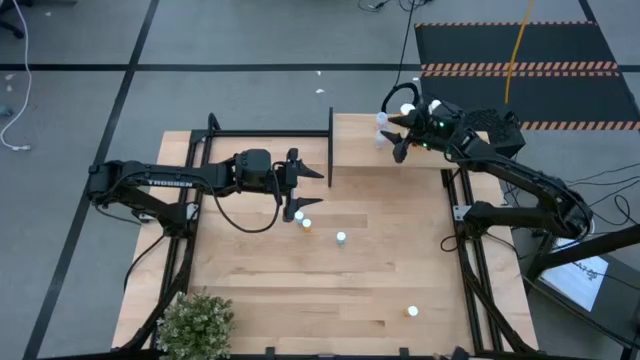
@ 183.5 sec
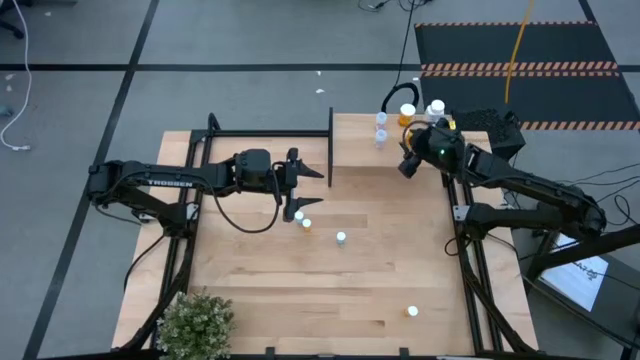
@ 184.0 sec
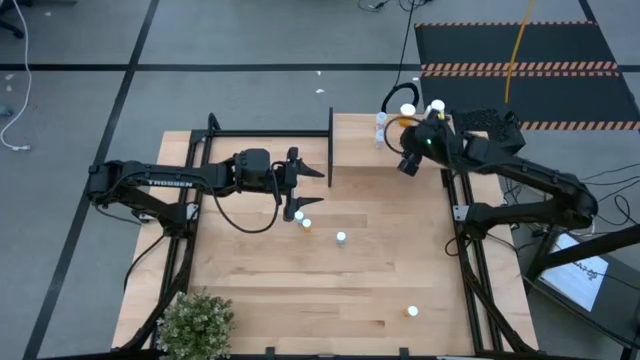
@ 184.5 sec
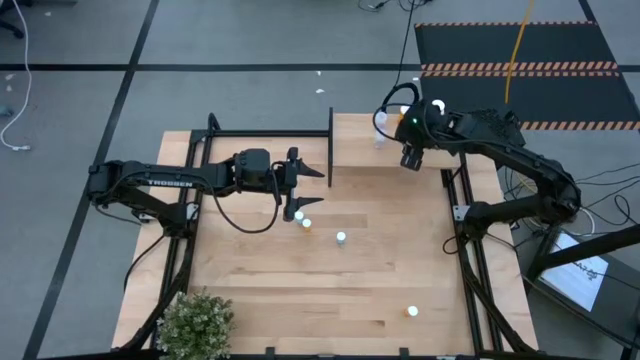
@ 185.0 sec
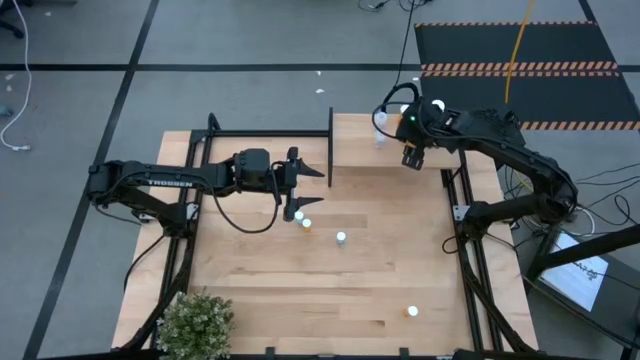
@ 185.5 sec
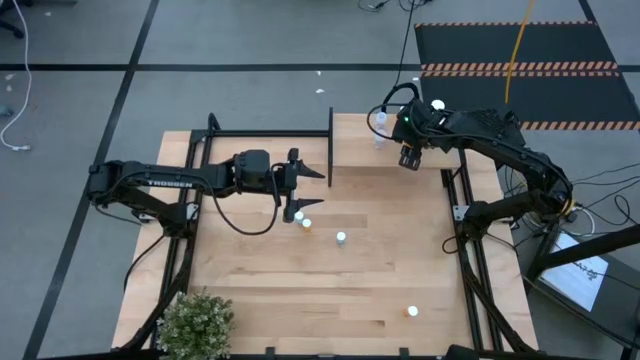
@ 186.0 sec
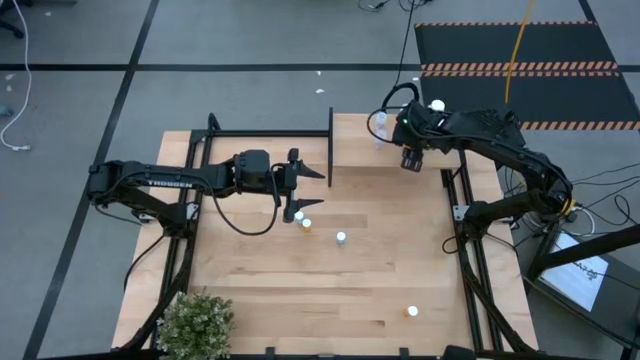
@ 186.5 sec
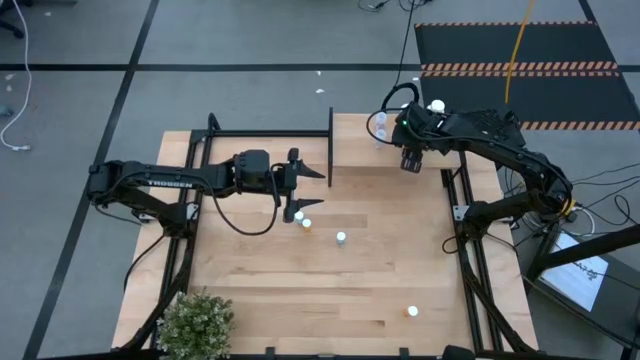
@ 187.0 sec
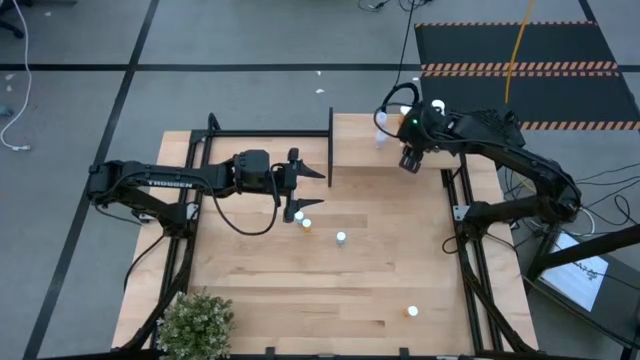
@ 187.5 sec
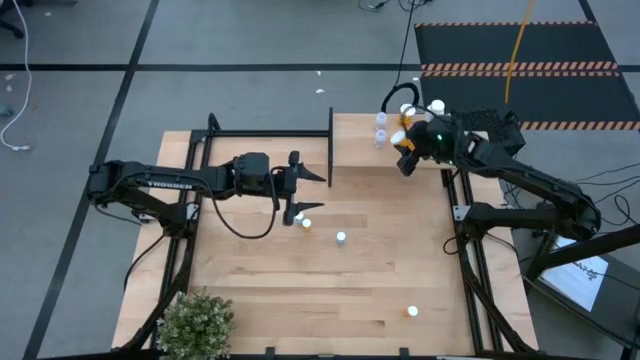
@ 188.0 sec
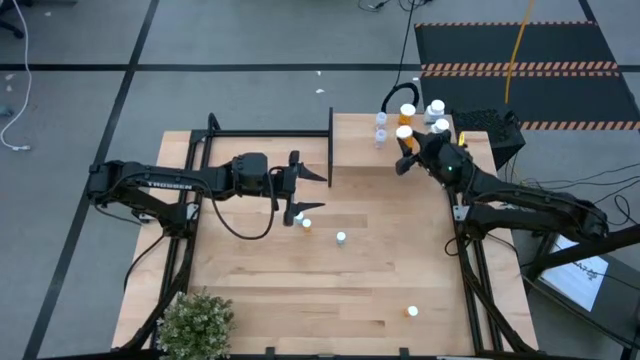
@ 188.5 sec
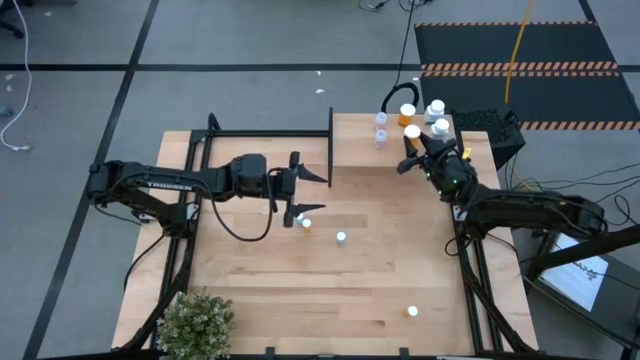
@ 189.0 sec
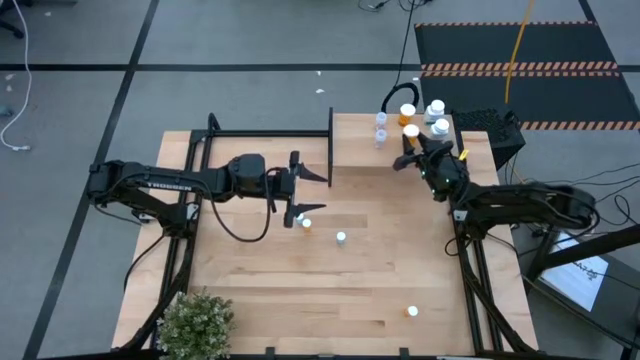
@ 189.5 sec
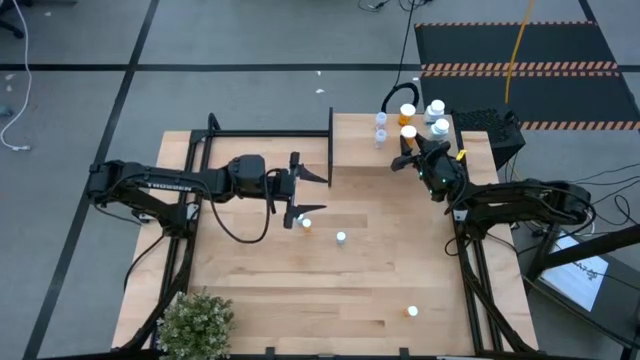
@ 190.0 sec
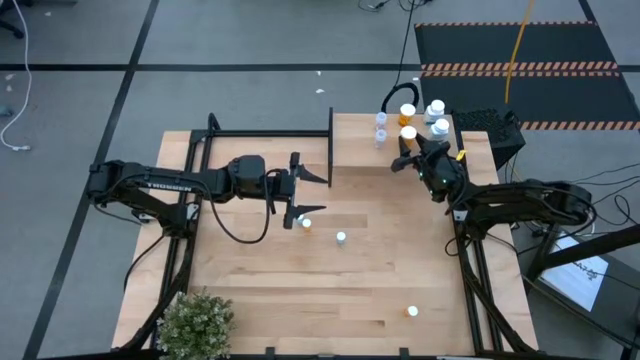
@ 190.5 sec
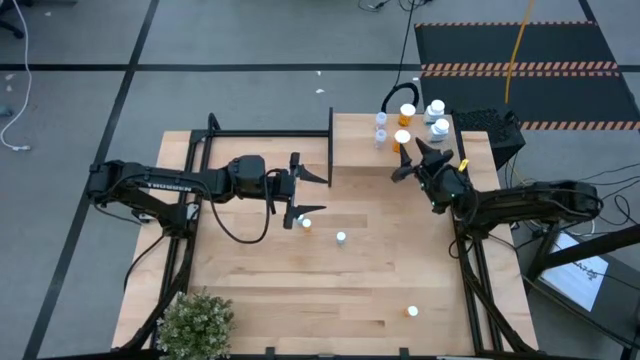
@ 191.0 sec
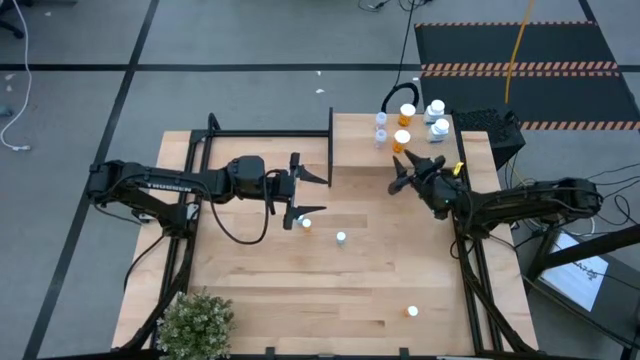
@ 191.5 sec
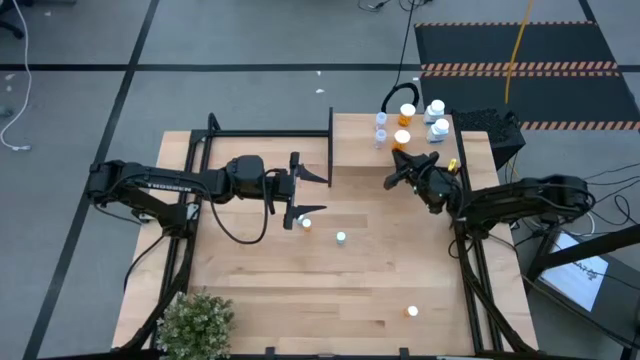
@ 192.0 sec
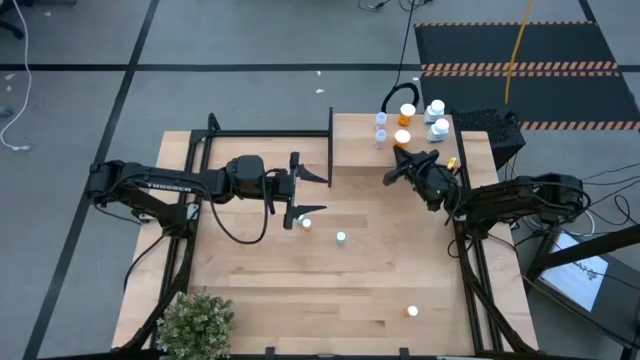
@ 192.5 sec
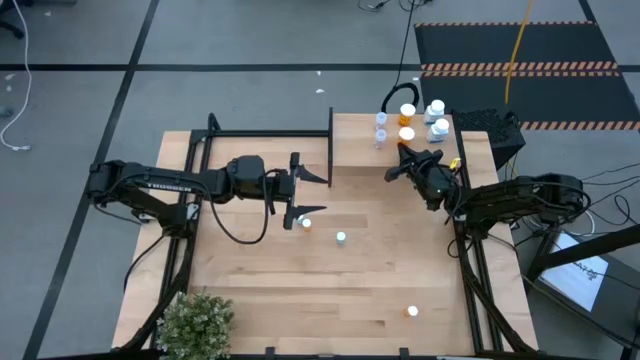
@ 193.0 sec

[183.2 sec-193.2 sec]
Task: Pick and place medicine bottles onto shelf by color
Adjust the large orange pill bottle on the shelf

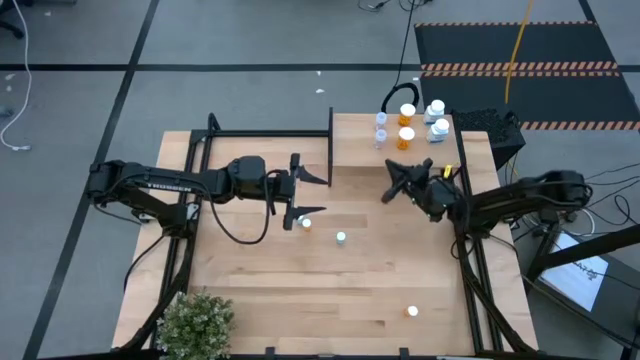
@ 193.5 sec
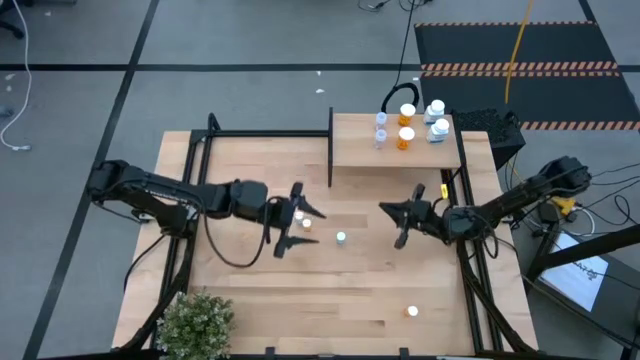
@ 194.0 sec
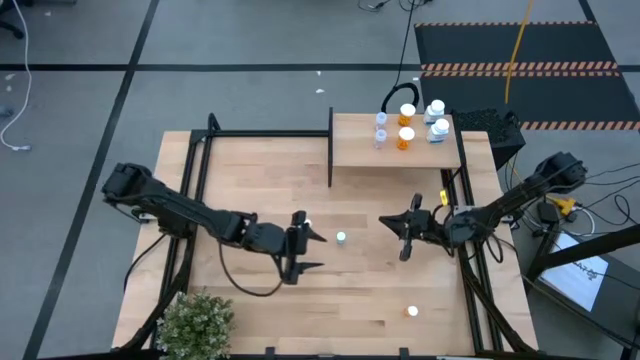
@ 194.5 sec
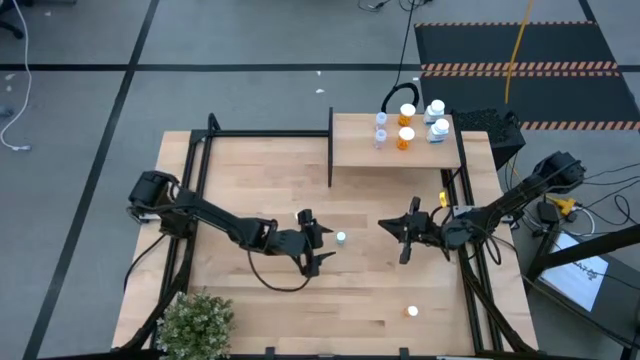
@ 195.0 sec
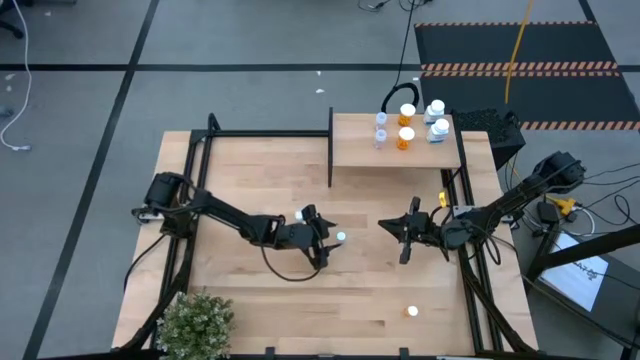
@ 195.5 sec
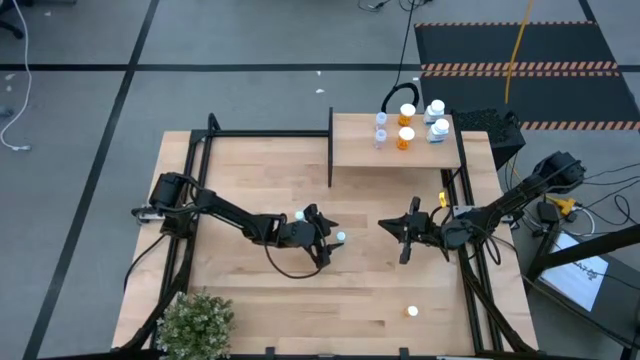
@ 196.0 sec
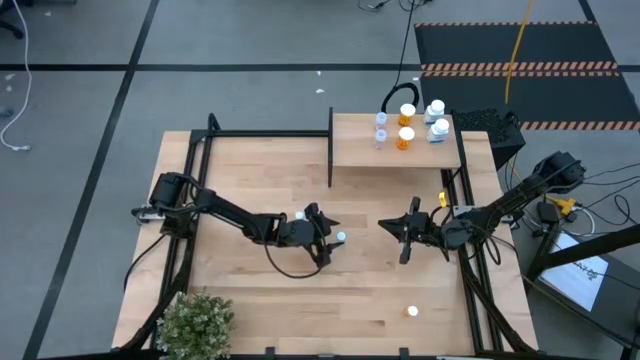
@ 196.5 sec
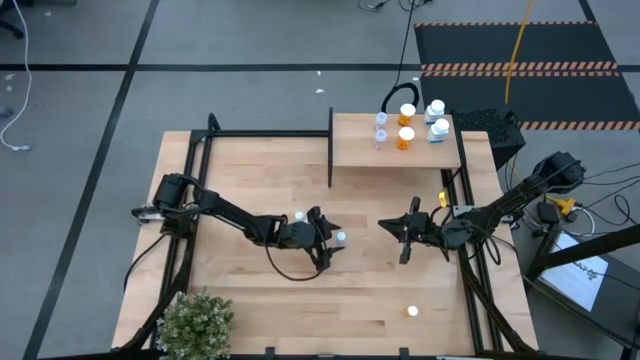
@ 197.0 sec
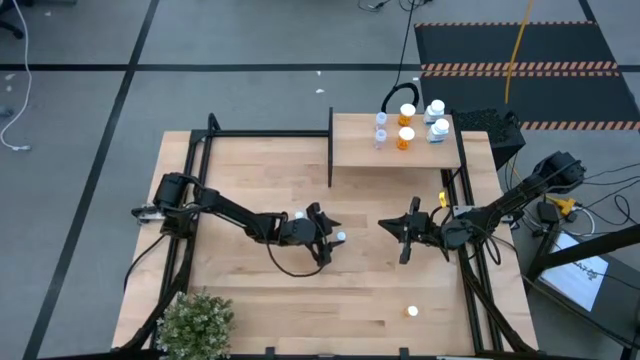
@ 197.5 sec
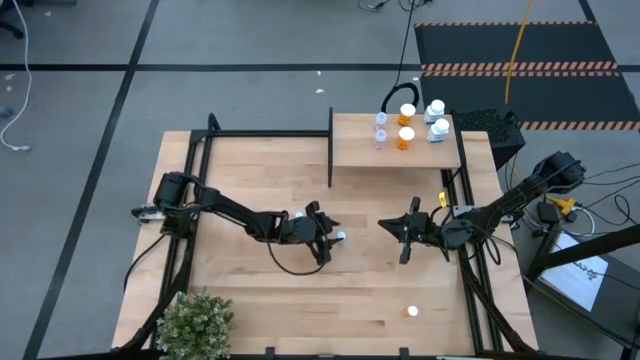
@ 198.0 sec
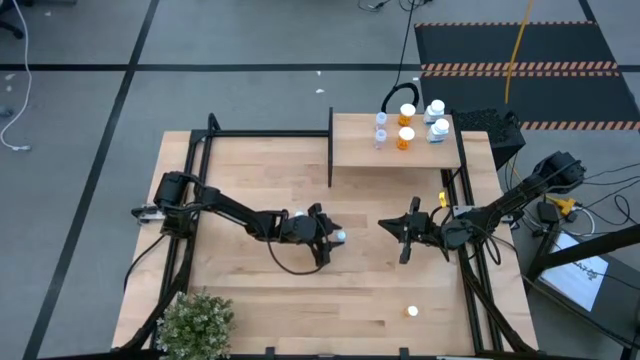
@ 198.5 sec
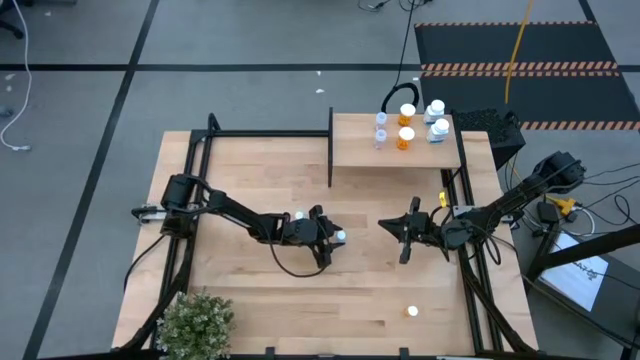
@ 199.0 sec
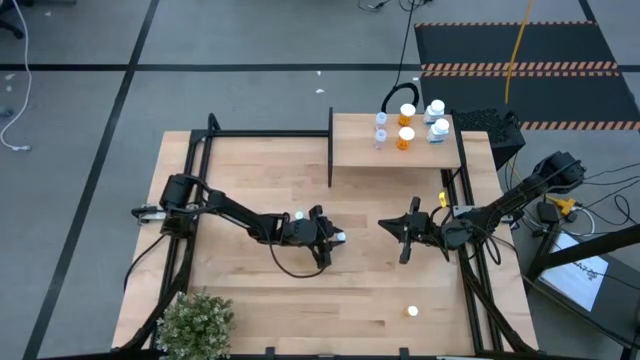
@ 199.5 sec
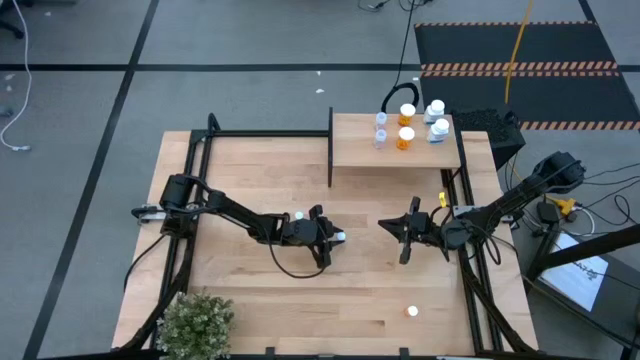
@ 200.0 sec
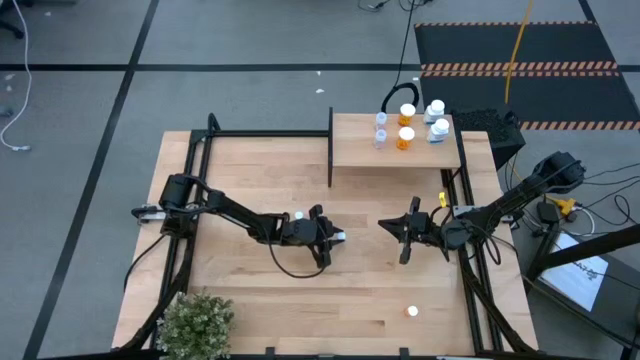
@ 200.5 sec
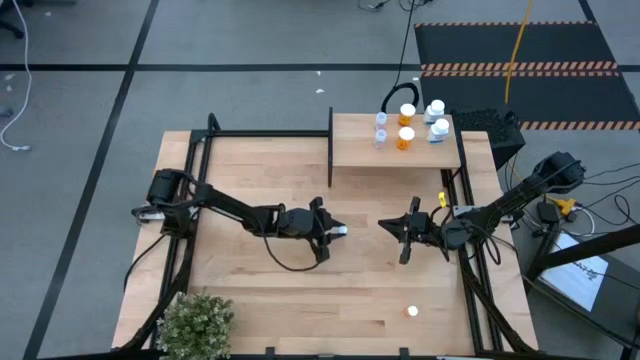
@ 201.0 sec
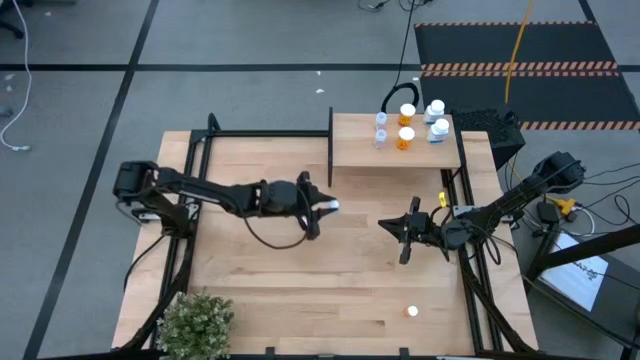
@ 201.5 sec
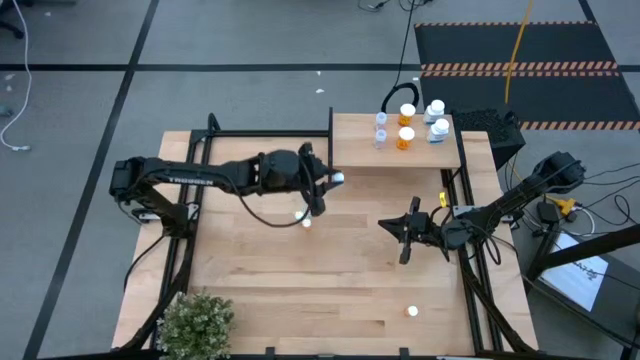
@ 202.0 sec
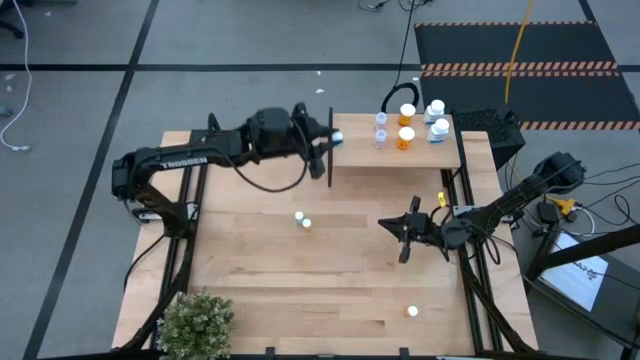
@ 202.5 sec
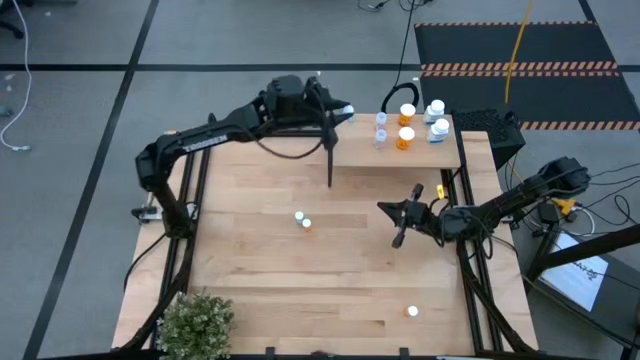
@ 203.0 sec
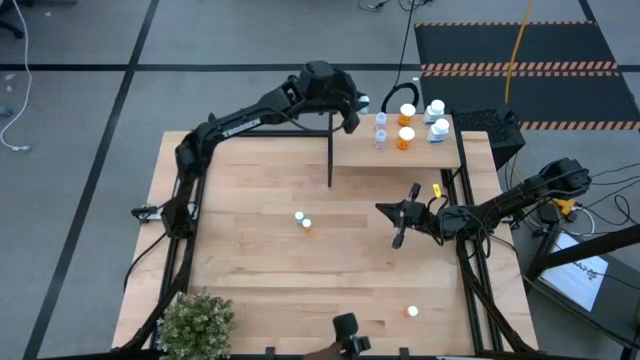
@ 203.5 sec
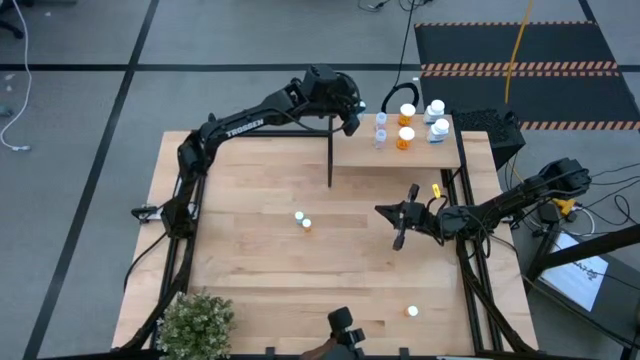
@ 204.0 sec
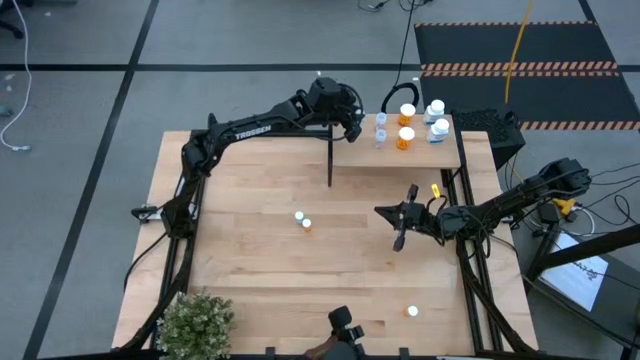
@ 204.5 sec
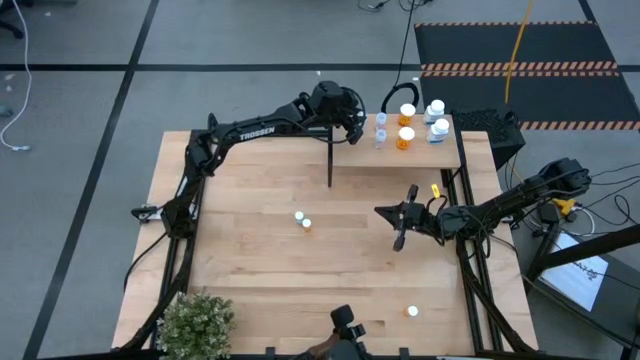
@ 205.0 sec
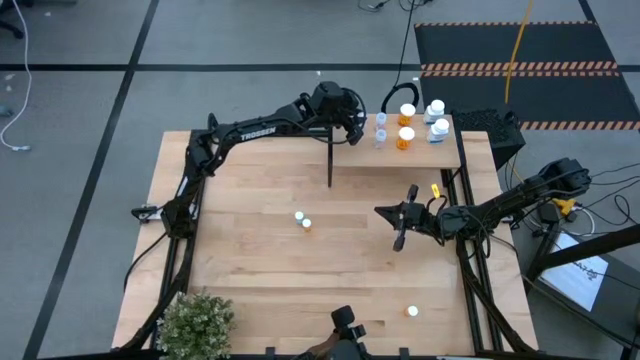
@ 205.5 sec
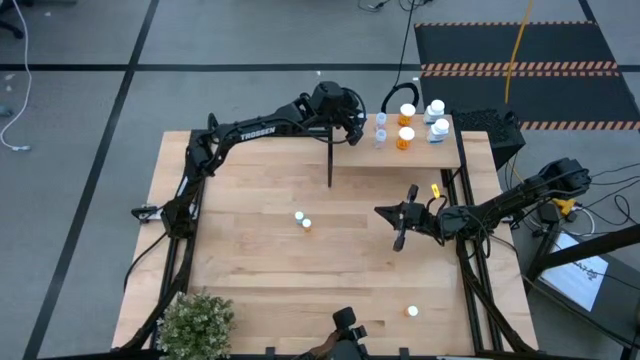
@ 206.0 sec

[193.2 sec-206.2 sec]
Put the bottom blue pill bottle on the shelf
